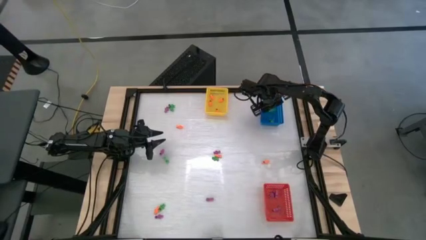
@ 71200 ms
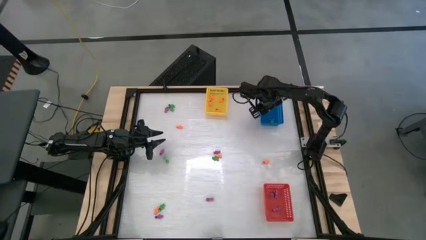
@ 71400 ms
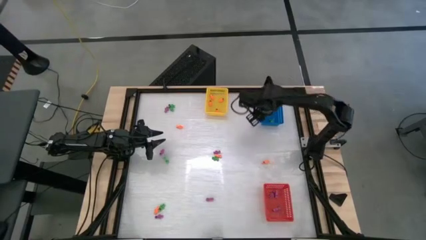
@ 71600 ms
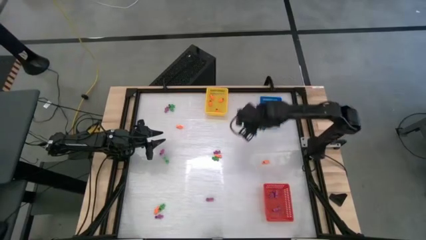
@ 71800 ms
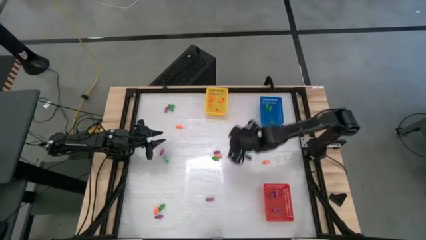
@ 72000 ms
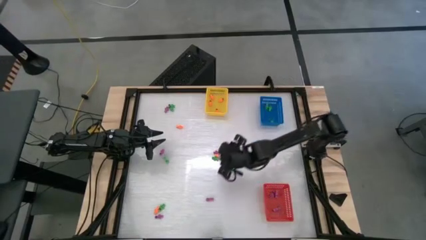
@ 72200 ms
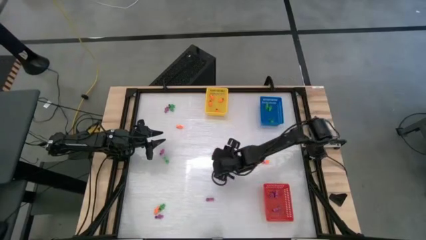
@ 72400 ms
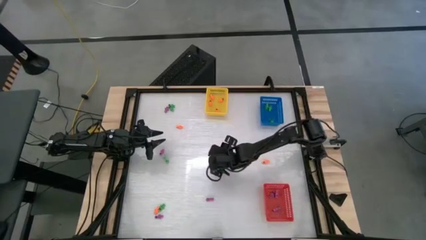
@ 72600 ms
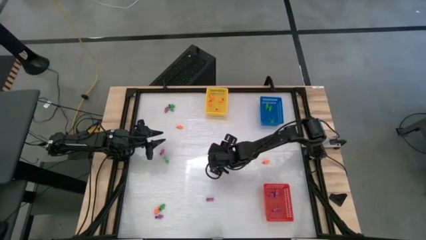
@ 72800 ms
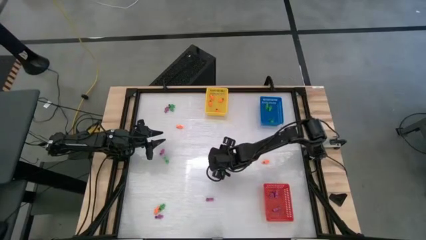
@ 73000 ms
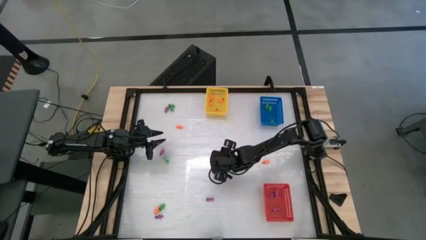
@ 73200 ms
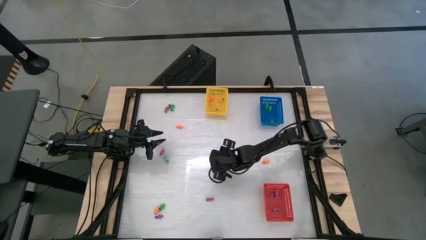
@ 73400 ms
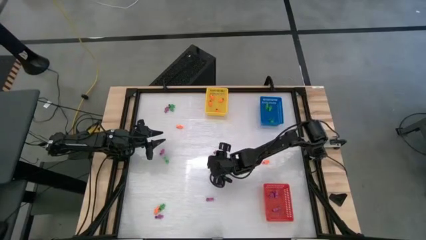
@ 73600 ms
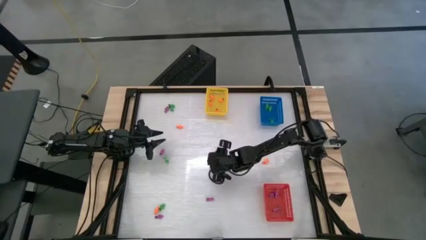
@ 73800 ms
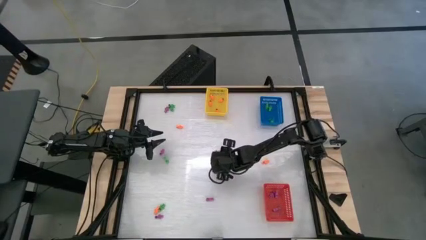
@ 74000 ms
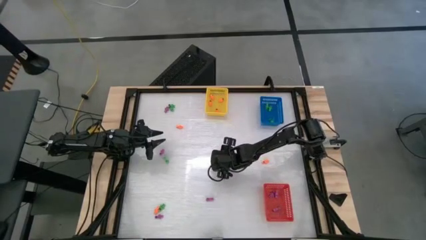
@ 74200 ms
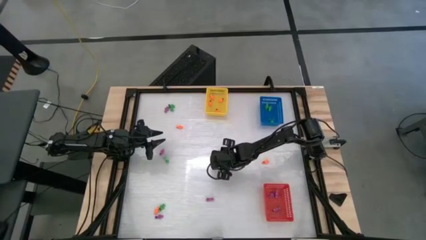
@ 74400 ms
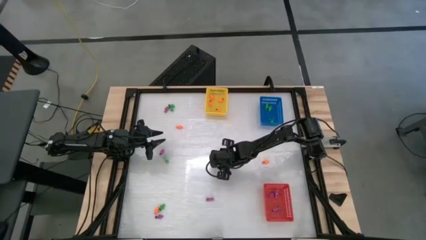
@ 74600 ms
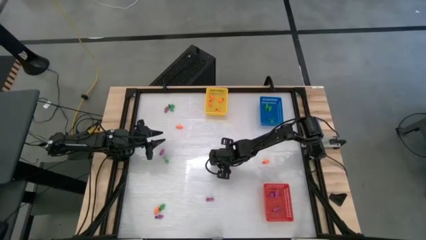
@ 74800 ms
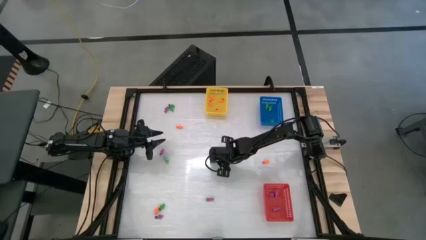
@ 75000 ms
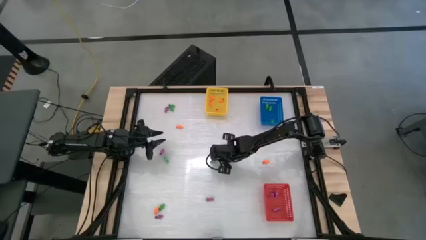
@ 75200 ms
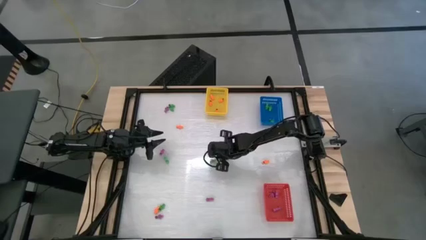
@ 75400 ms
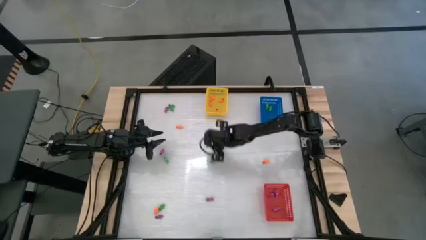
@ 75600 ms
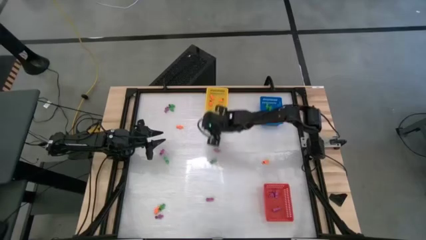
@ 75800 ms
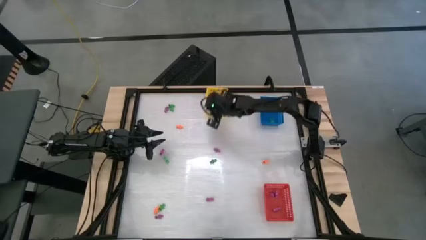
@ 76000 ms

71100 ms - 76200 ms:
Task: Sort Halloween decoration
Put the orange skeleton toy into the yellow bin

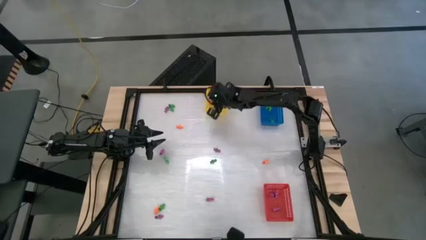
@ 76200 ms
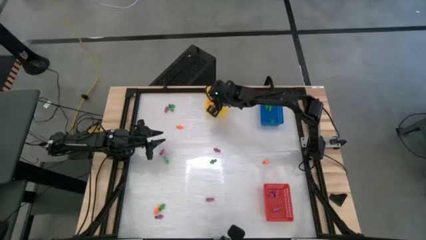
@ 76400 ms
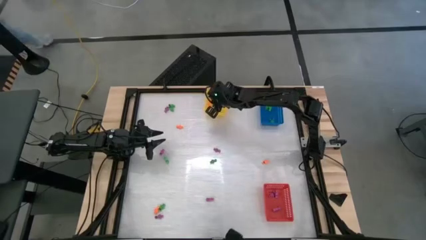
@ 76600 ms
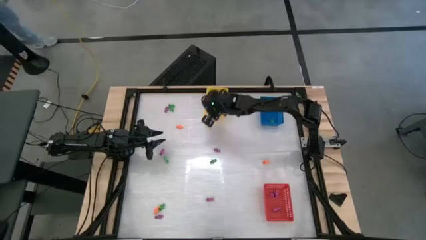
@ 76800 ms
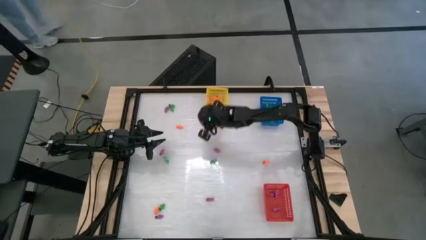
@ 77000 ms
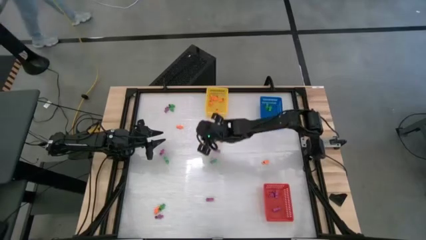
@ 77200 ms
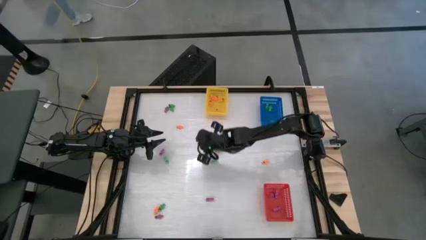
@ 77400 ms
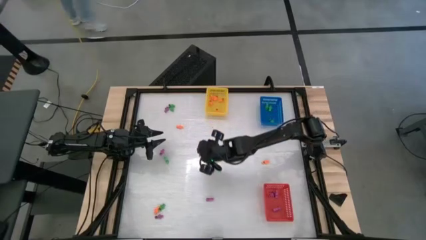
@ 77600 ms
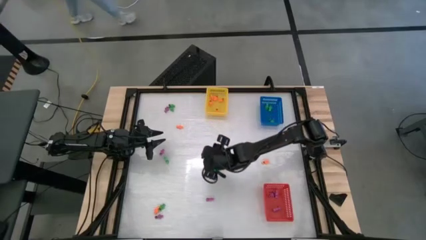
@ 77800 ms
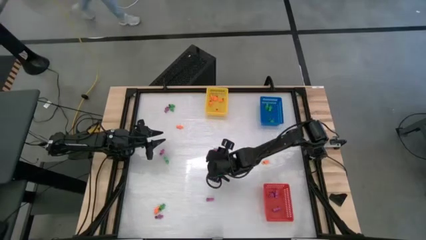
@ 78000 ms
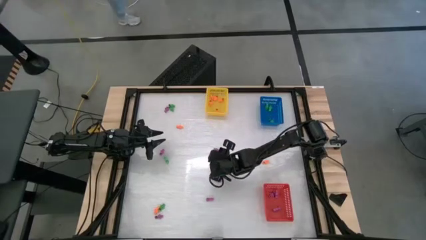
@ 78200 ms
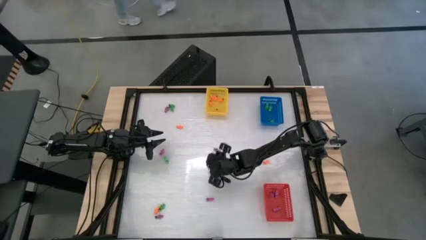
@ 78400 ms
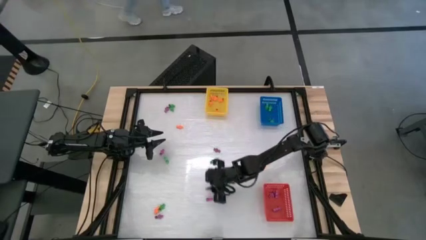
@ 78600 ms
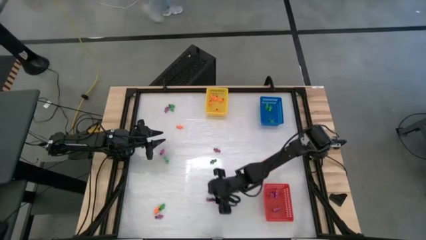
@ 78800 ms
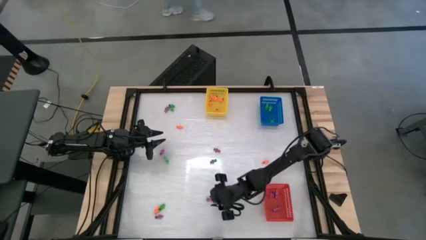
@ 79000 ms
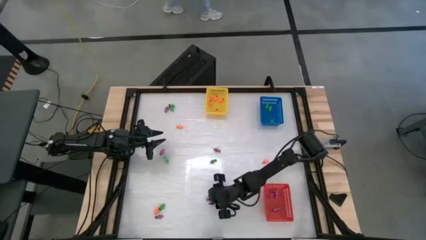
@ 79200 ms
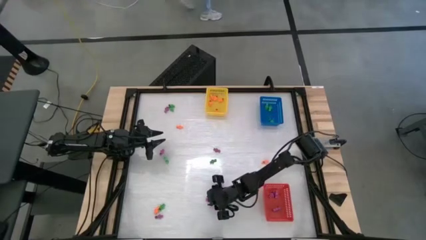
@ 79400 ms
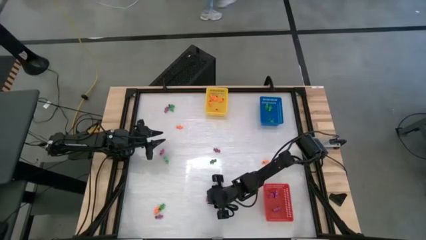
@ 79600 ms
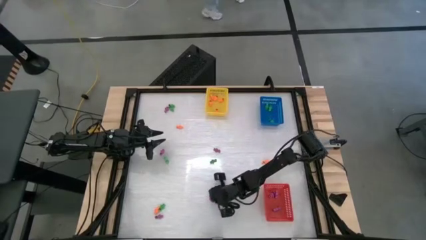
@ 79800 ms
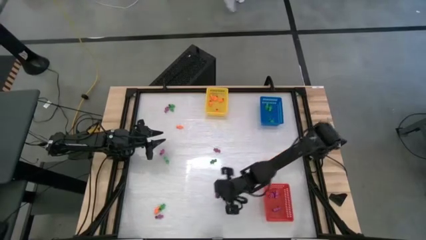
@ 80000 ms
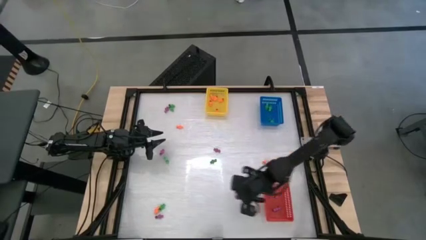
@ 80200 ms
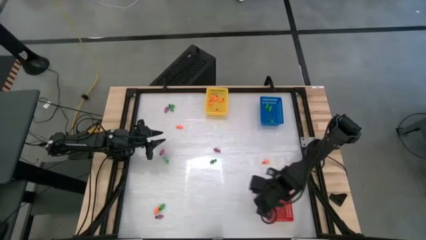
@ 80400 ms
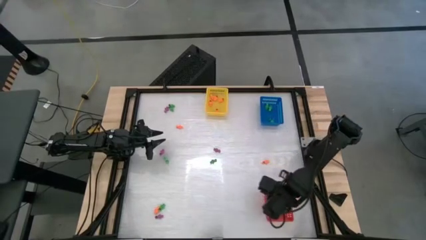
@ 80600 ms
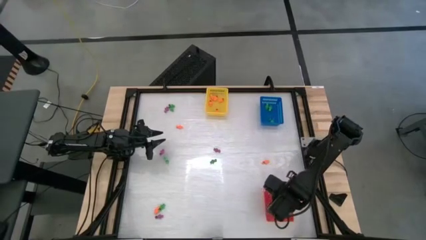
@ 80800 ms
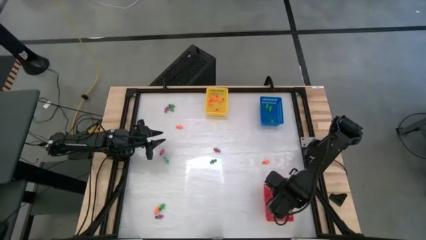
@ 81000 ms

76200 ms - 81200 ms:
Put the violet skeleton toy into the red bin

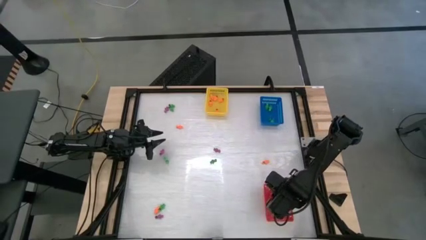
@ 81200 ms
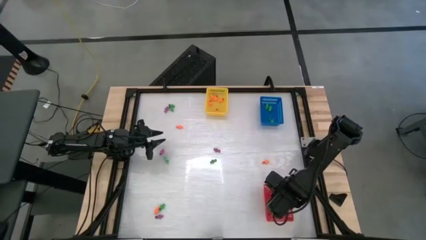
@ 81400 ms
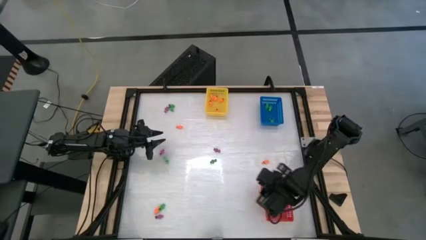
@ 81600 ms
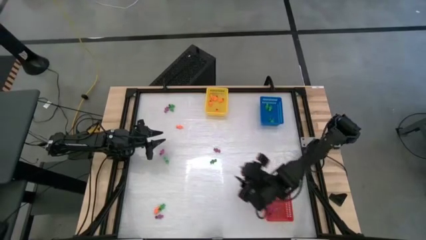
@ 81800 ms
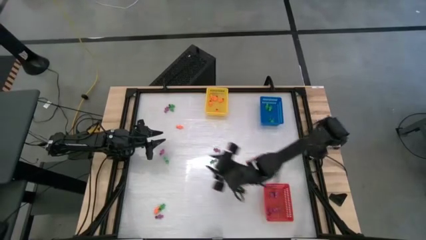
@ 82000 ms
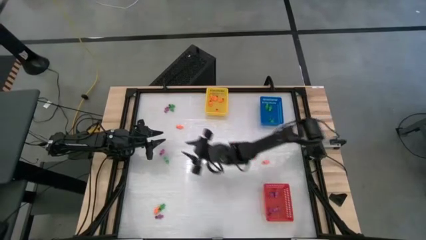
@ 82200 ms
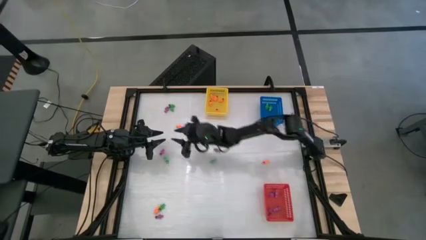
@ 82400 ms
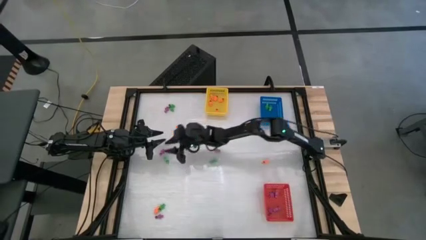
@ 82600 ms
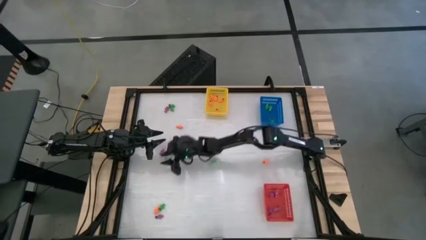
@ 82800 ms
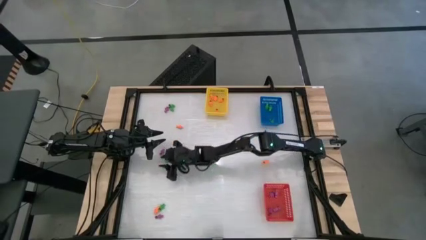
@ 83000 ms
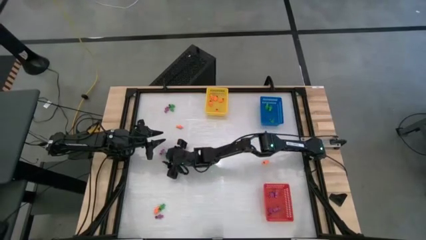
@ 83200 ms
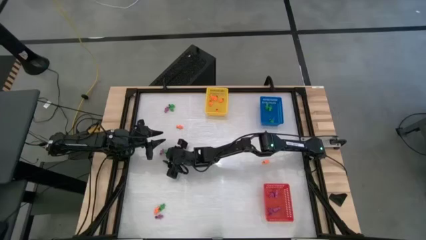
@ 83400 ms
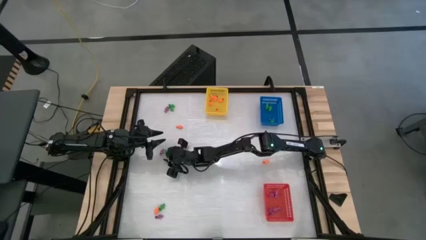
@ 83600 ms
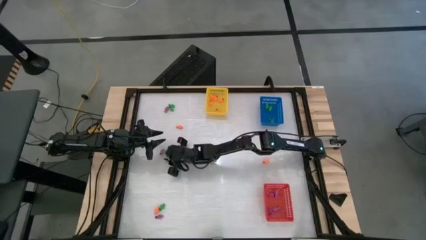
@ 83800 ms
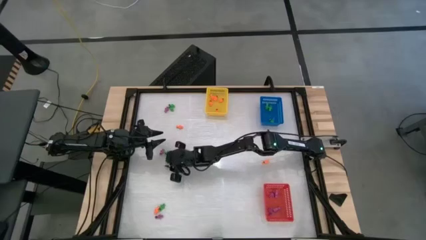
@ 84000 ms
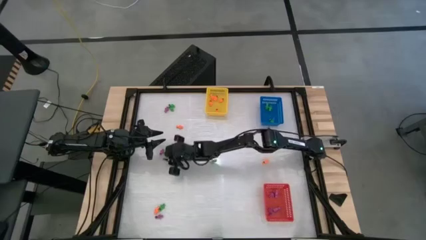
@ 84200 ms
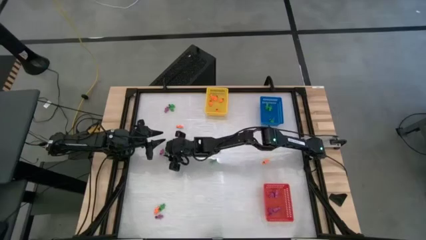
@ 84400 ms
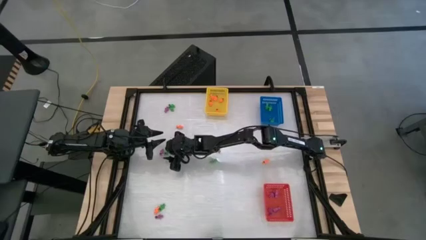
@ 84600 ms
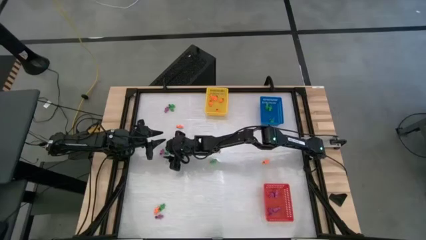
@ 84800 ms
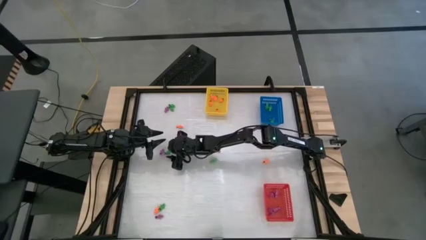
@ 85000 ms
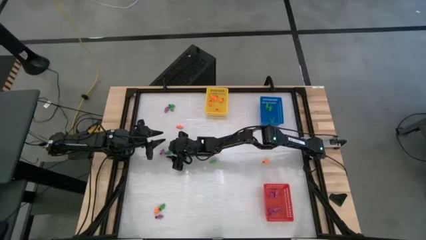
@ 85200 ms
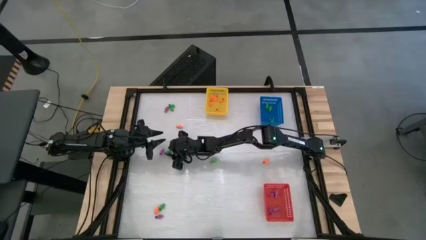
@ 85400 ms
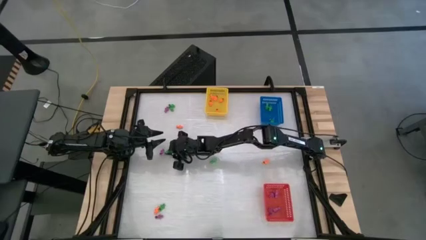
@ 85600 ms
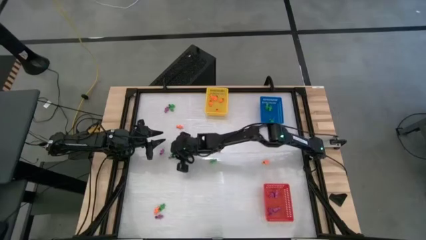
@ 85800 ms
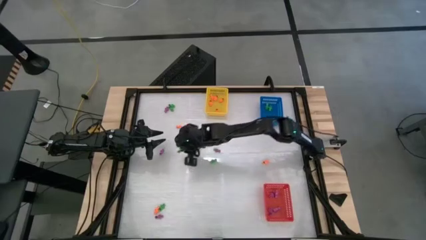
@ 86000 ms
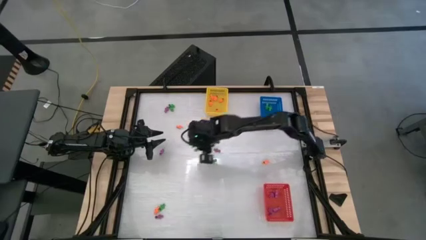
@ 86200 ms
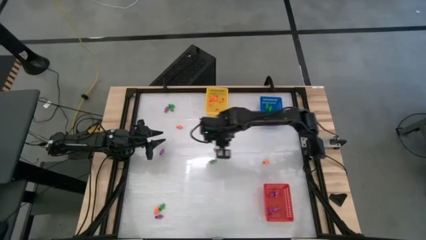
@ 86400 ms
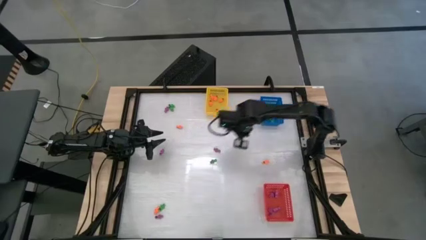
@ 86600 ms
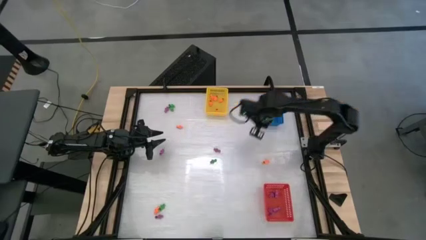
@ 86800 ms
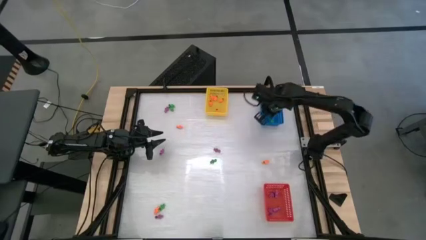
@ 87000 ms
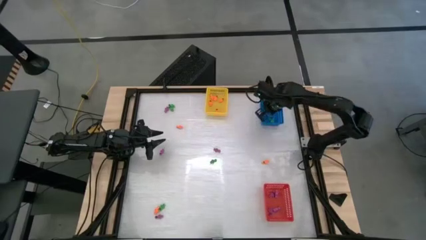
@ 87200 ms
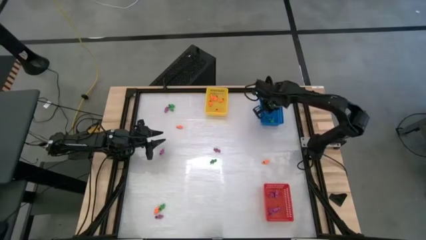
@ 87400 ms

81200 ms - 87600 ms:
Put the green skeleton toy into the blue bin
